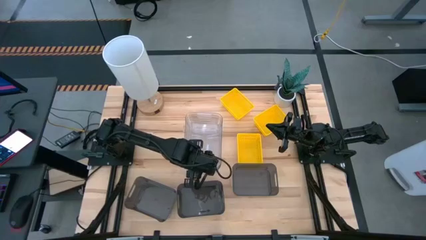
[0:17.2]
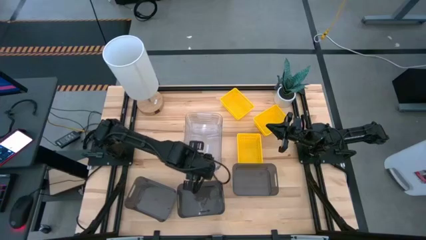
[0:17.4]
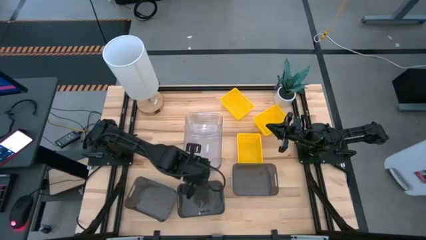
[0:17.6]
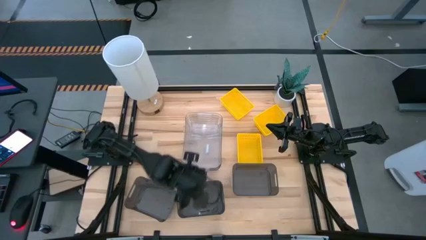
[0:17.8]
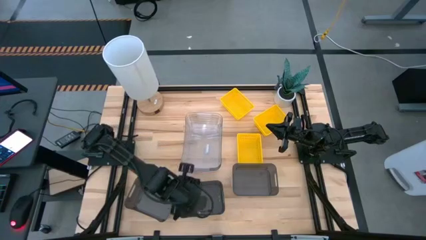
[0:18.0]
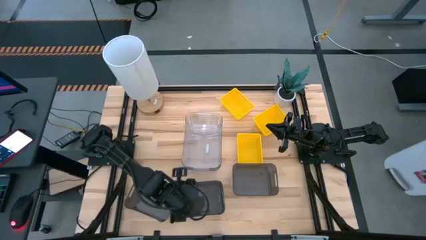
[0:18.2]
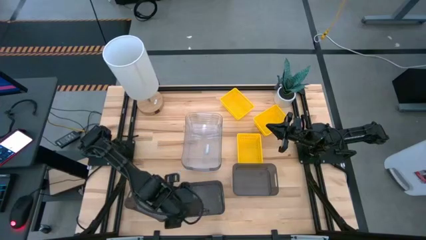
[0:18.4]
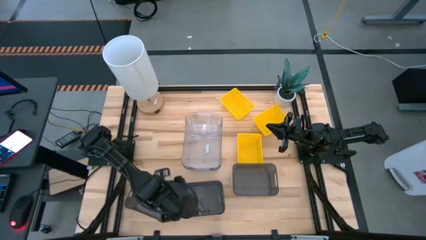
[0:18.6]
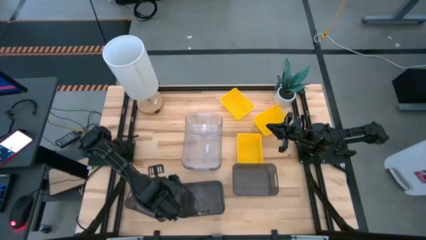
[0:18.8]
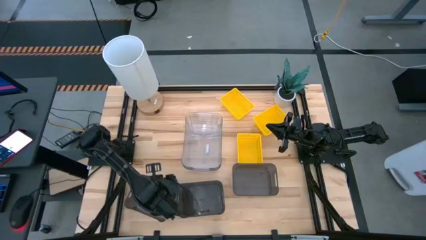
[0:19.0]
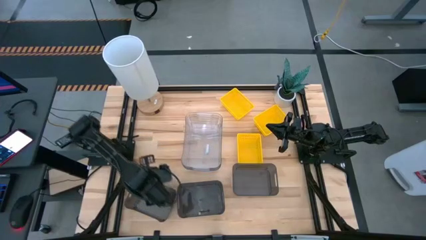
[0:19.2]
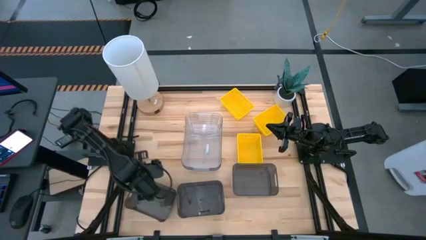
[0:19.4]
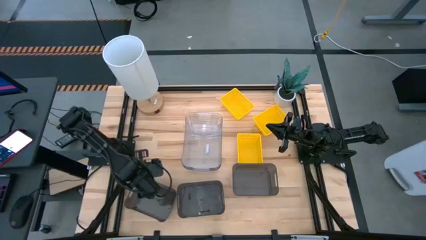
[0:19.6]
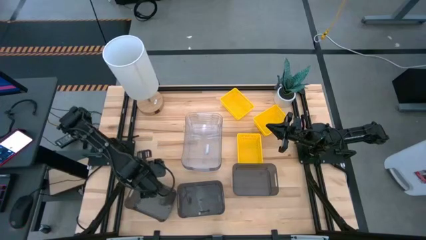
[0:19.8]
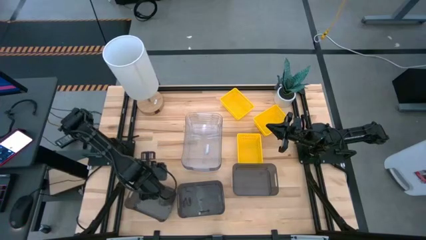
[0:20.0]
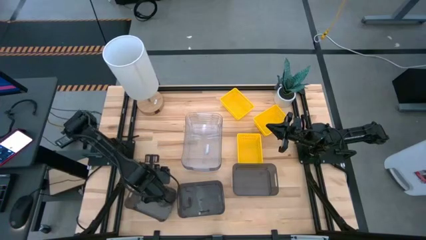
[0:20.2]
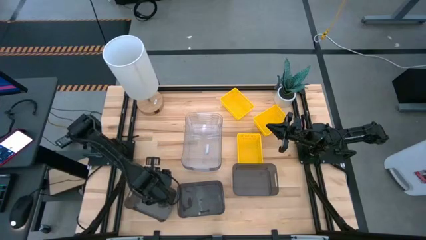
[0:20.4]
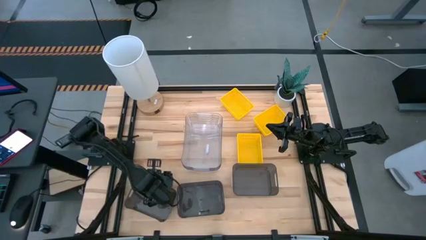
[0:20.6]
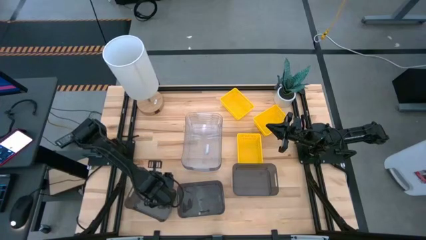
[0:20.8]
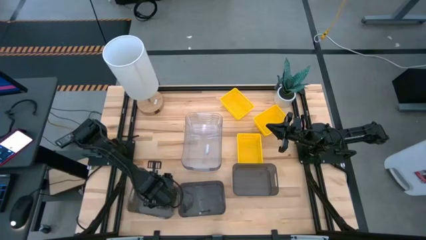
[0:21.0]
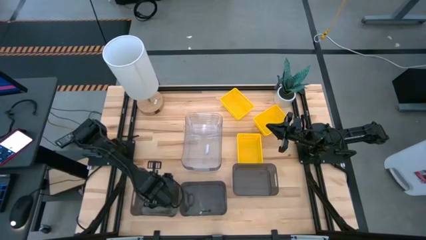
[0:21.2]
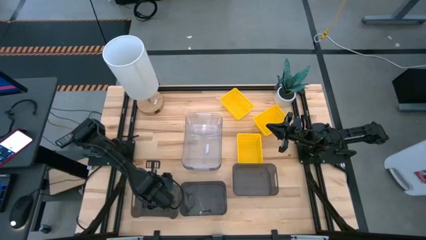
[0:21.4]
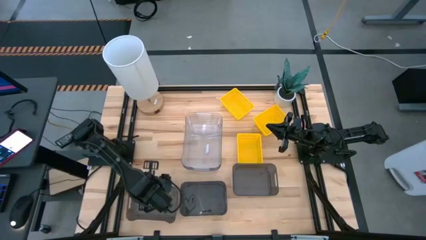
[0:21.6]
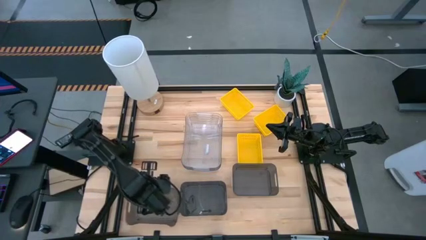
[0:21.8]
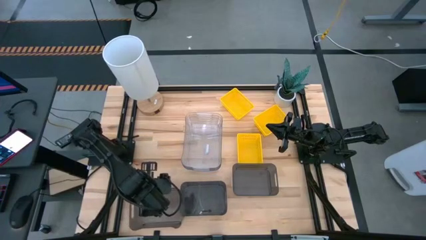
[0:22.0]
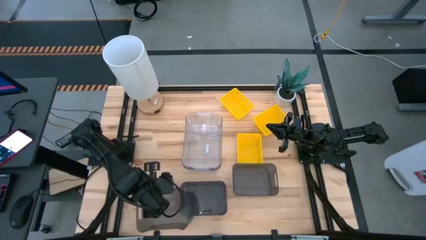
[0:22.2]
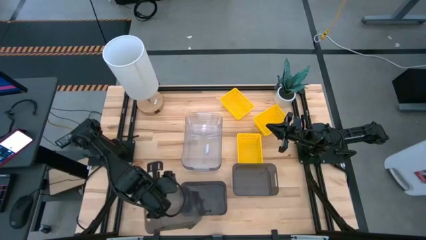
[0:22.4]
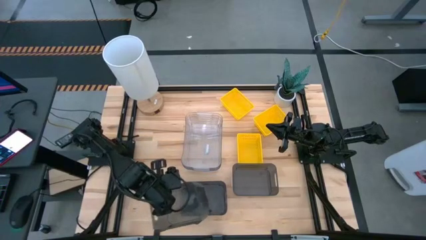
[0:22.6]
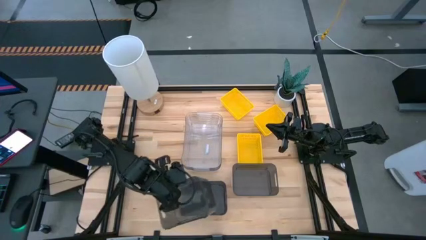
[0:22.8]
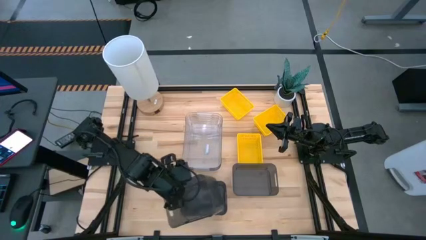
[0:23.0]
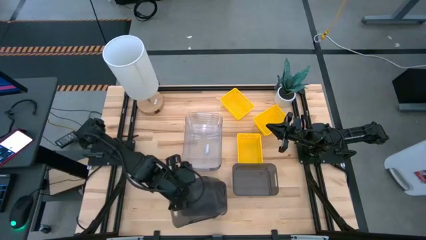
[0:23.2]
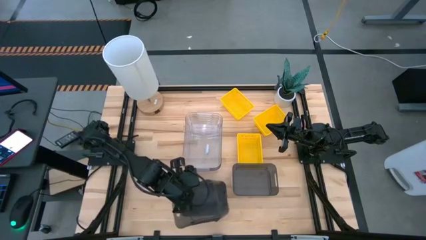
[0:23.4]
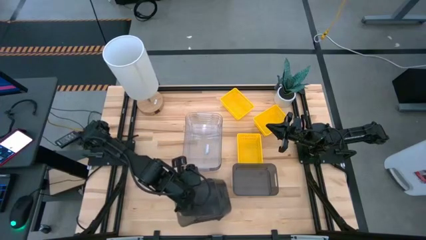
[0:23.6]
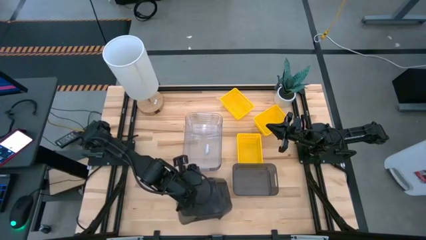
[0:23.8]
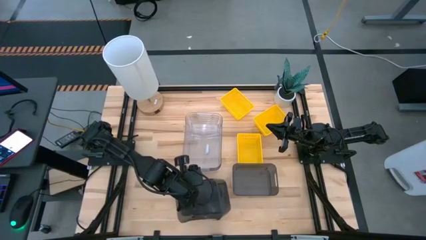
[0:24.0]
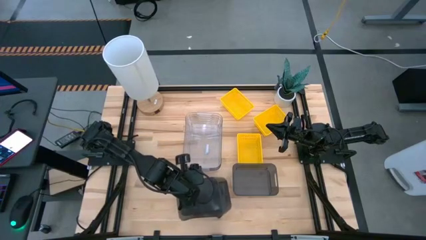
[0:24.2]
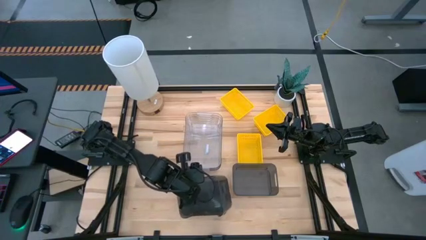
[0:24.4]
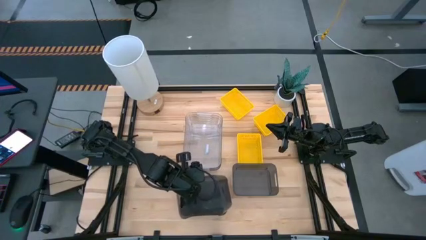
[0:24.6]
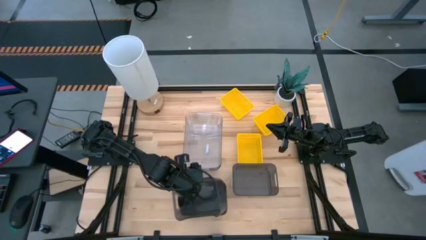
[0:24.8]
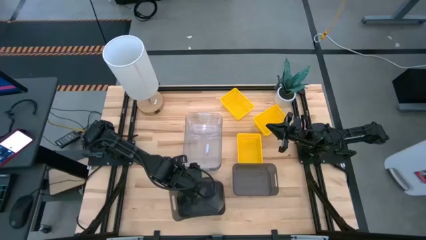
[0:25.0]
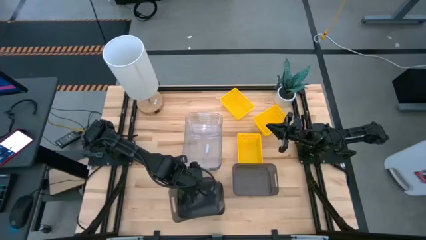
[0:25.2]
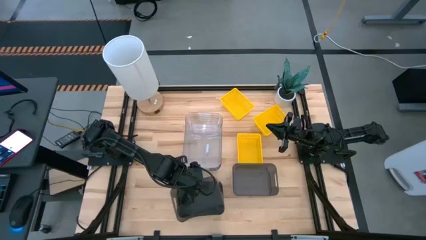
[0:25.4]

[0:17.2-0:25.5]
Stack the left black bin on the middle black bin

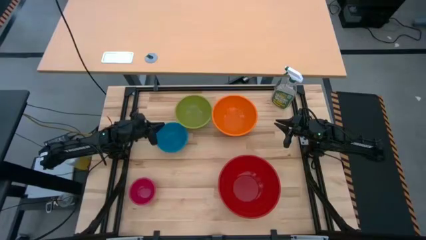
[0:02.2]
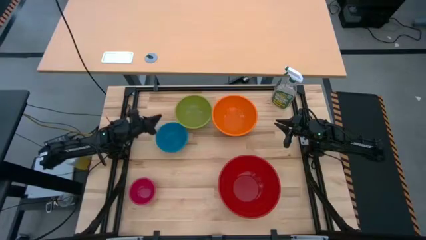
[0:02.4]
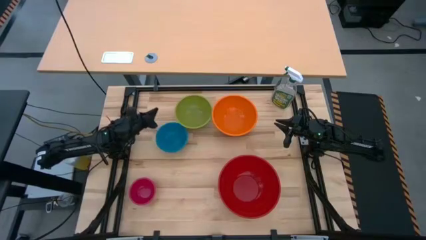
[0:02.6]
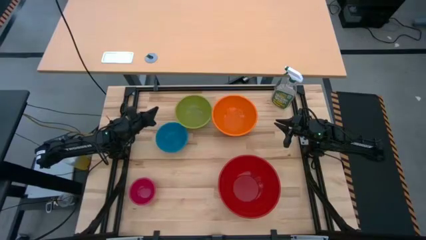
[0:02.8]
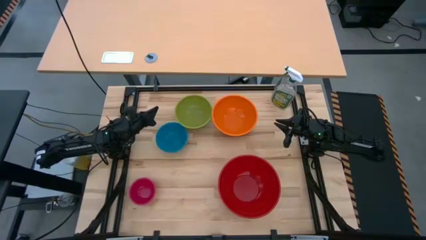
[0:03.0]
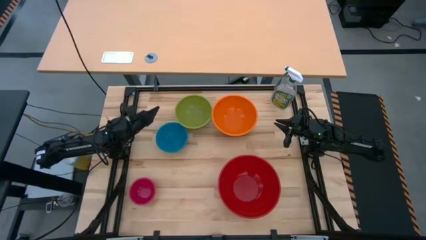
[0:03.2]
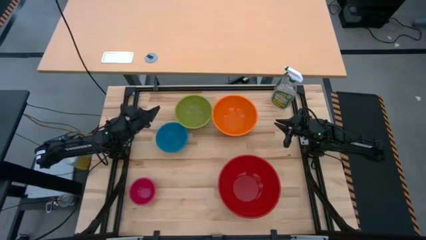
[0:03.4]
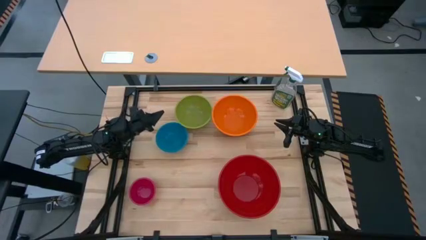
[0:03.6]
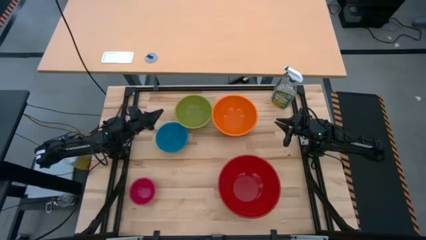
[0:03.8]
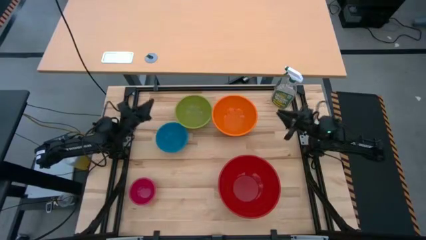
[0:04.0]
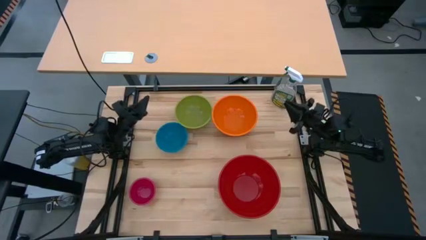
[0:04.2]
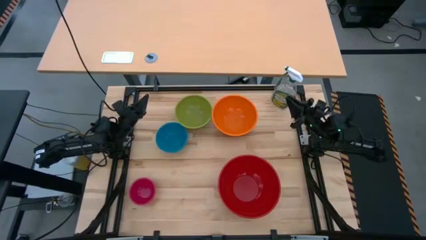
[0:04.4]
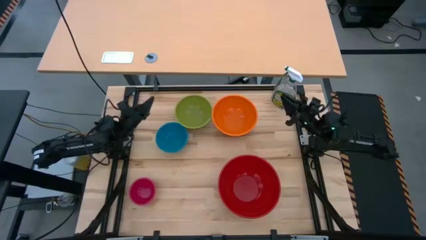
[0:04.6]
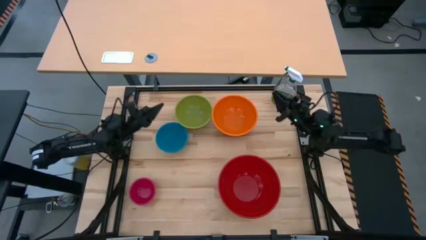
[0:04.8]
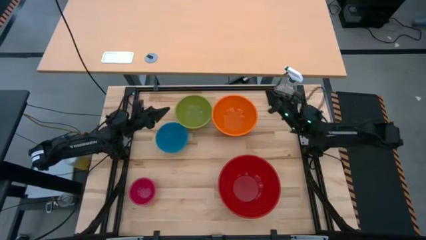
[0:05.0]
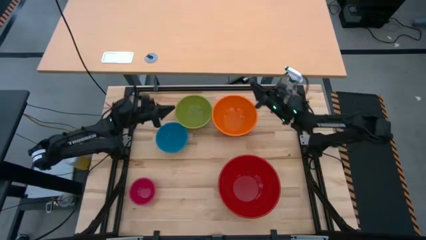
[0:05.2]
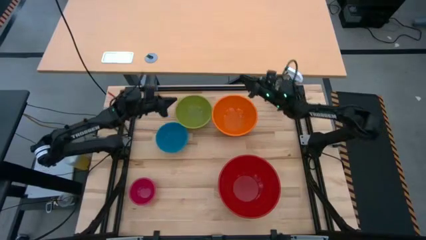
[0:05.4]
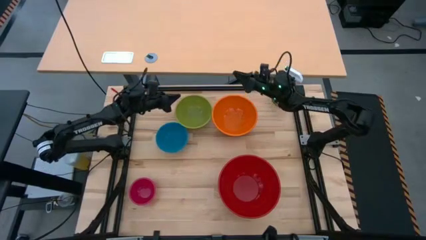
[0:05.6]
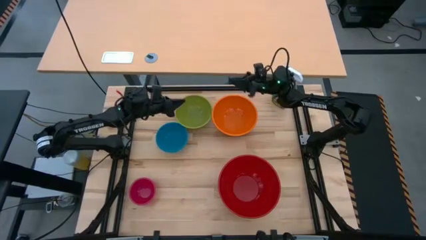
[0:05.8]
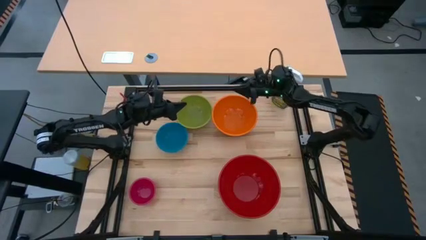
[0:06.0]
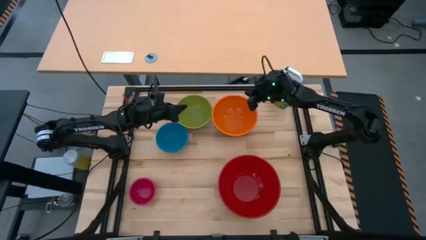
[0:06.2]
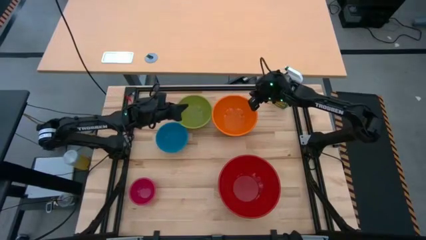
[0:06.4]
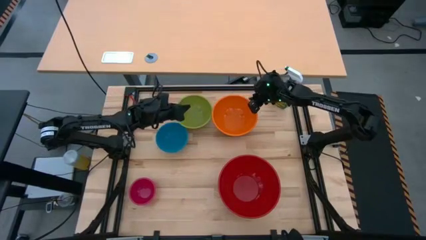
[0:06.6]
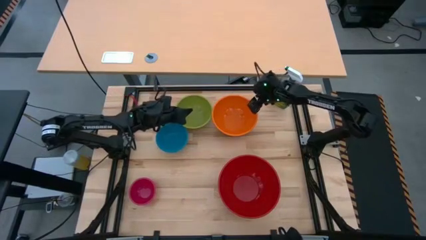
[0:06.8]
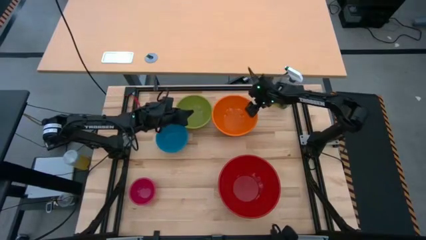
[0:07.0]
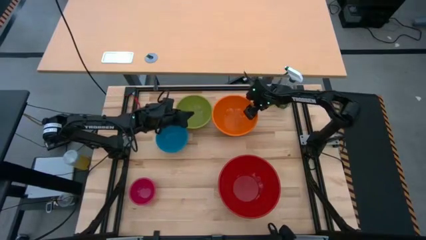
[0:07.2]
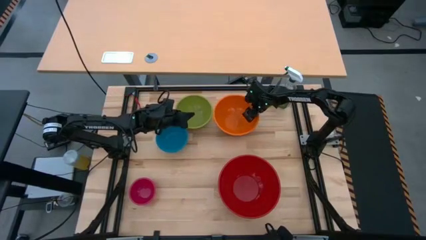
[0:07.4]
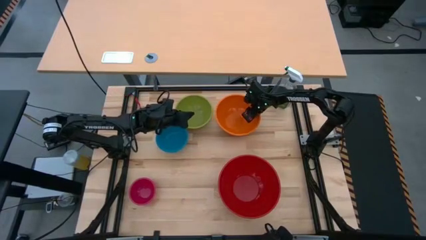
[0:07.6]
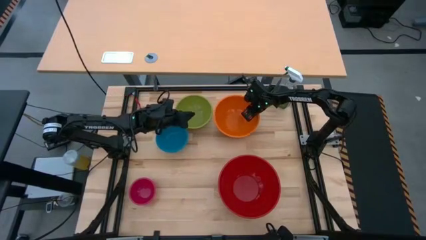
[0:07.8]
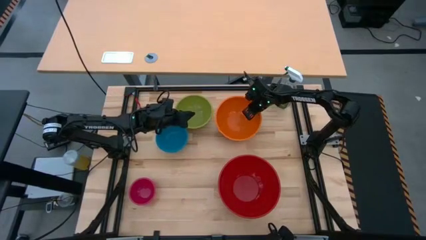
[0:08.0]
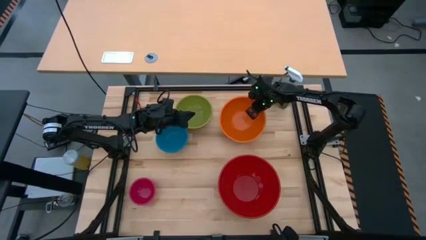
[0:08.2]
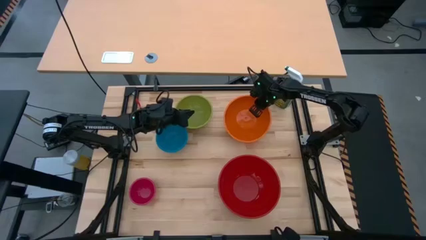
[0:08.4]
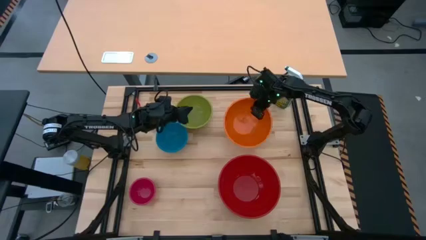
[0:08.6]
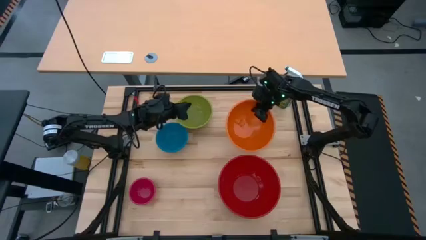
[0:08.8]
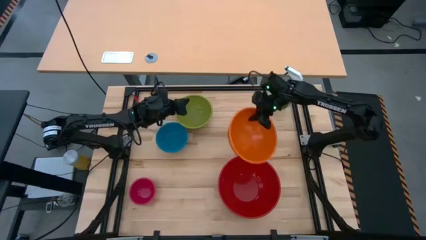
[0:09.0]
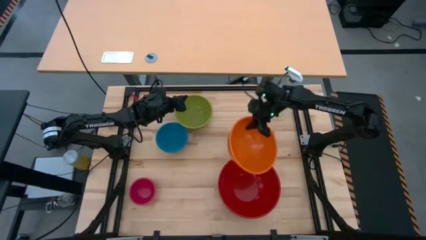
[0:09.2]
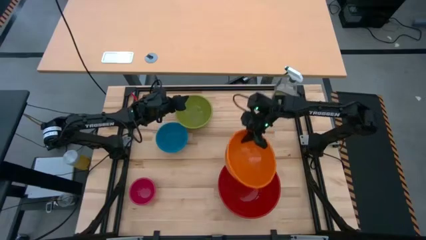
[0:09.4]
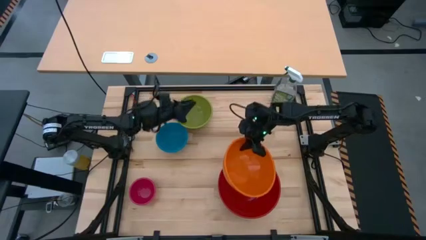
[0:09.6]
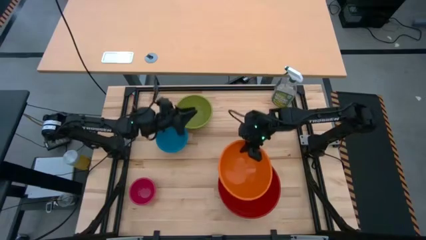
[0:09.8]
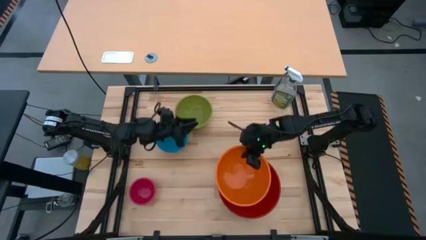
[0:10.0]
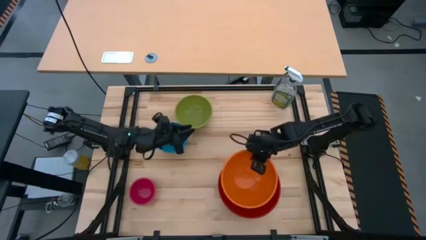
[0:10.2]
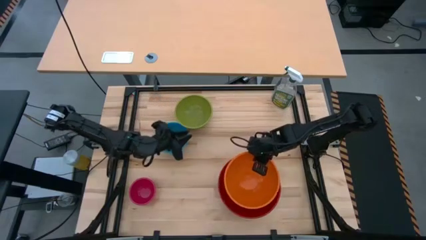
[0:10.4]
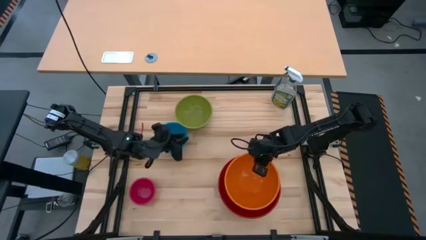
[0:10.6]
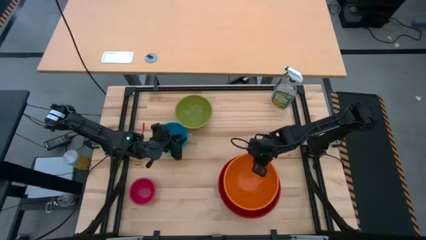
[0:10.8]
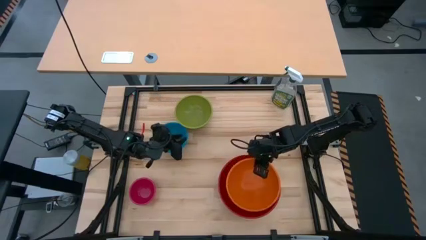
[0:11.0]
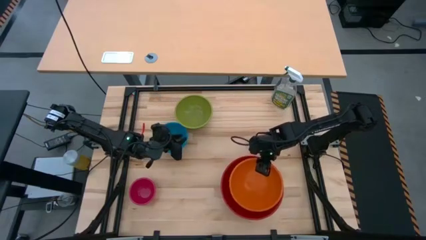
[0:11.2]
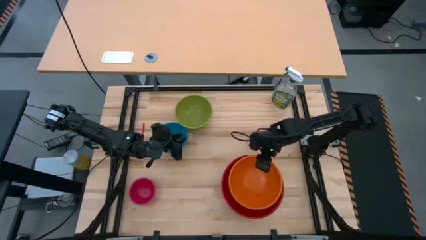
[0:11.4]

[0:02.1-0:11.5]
Stack the orange bowl on top of the red bowl
